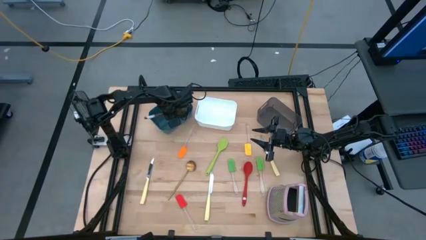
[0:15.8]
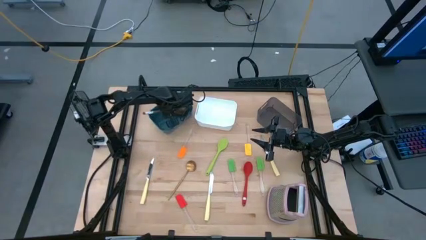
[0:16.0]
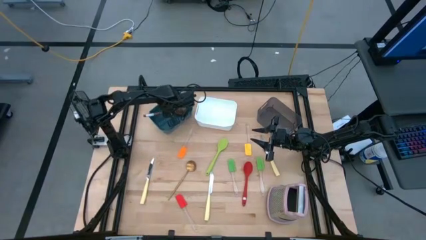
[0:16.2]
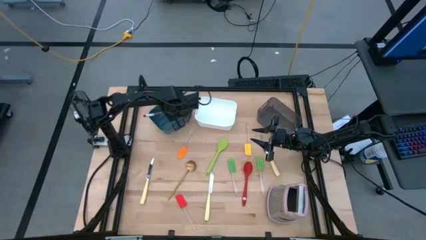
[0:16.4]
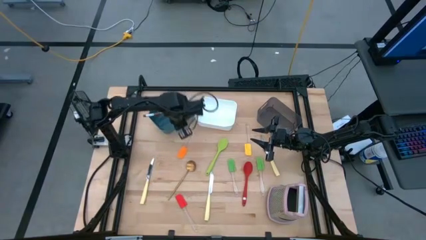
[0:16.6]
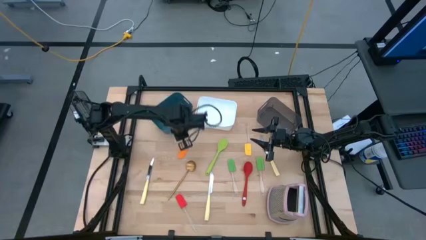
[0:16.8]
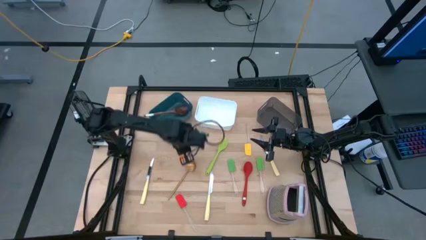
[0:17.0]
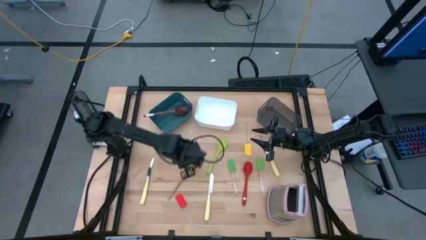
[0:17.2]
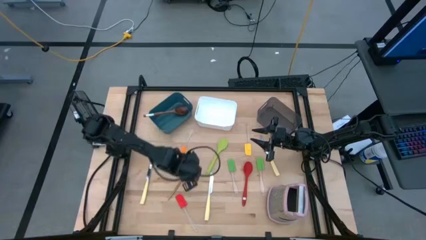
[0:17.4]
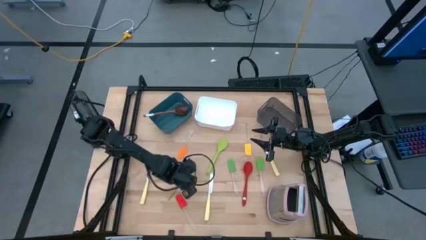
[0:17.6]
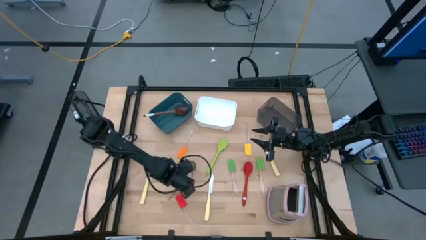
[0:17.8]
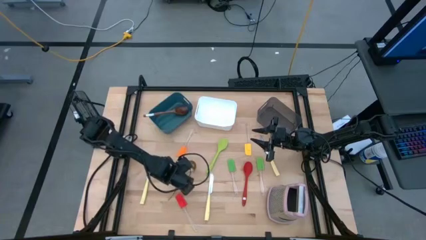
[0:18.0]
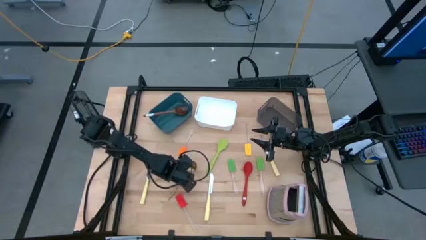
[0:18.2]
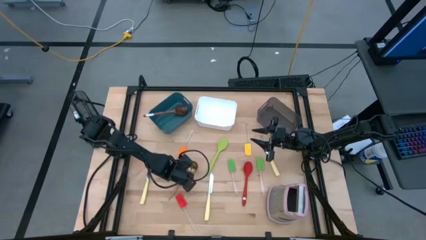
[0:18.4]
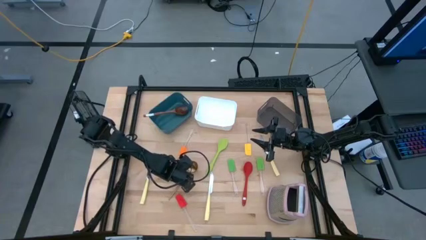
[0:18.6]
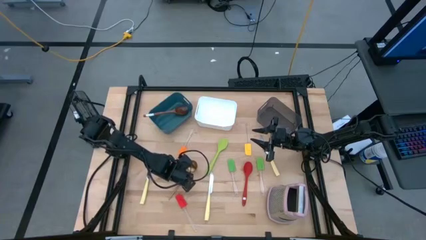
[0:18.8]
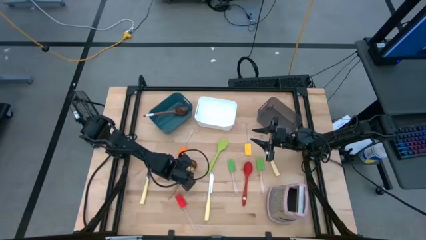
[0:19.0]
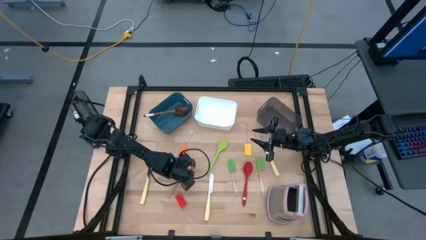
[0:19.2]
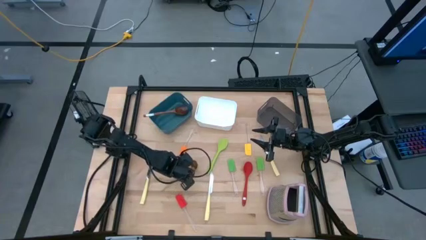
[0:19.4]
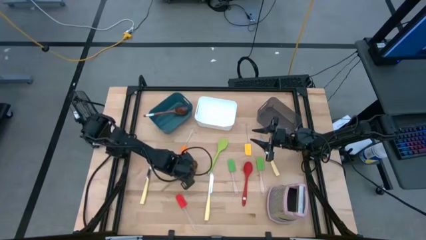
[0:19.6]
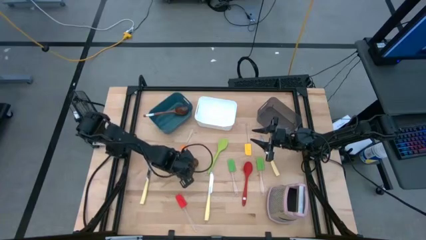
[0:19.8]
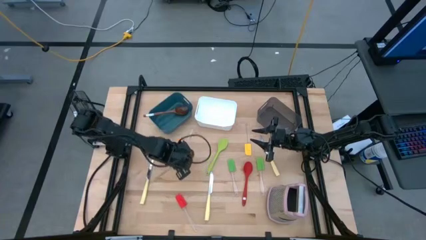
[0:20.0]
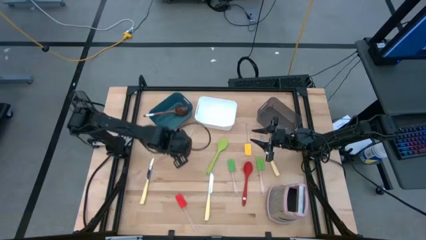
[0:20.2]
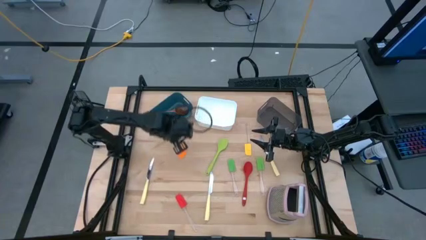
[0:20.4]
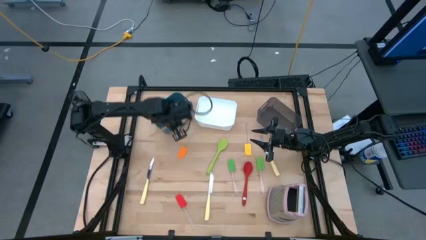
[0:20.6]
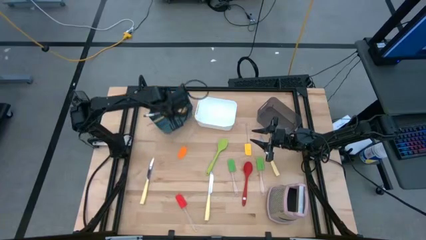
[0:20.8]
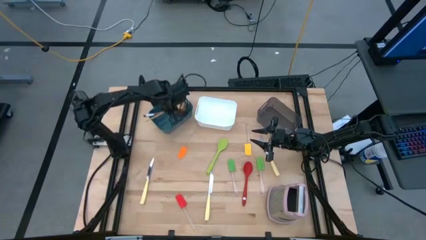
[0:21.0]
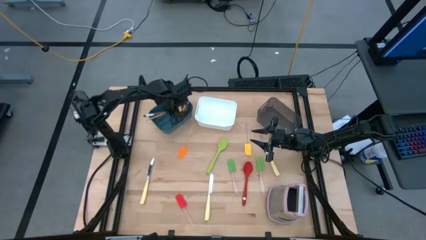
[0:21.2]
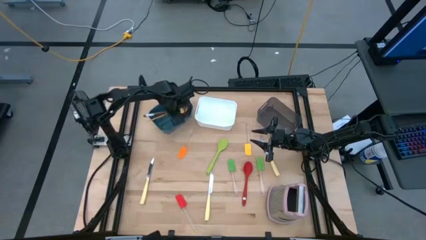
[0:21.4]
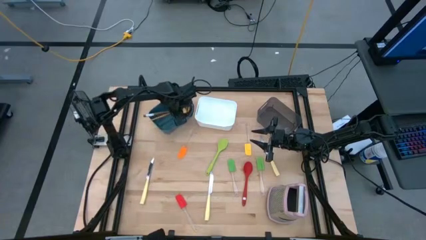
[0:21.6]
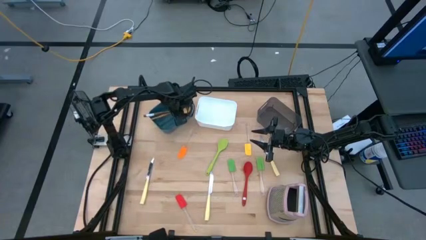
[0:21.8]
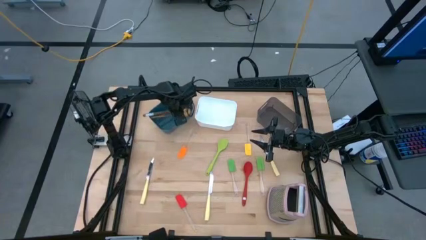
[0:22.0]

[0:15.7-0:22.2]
Task: Pick & Place Kitchen Items
Put the gold serving spoon into the blue bin

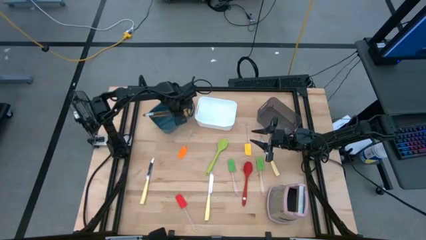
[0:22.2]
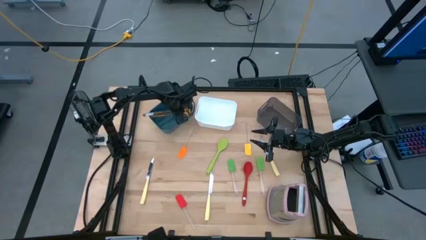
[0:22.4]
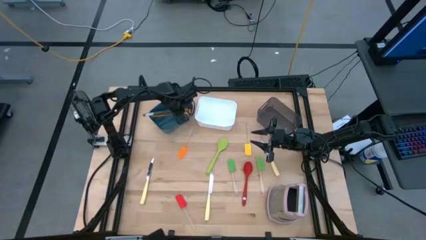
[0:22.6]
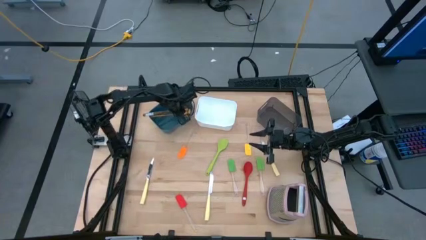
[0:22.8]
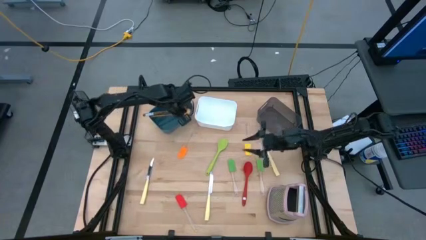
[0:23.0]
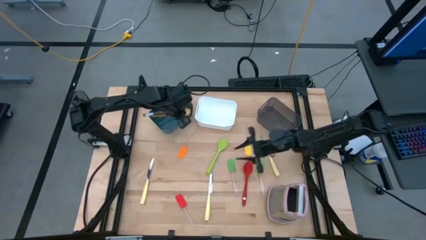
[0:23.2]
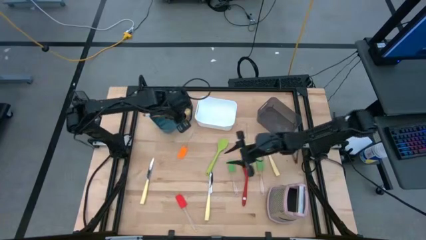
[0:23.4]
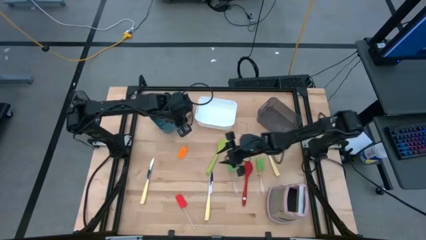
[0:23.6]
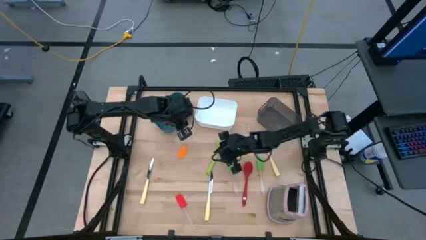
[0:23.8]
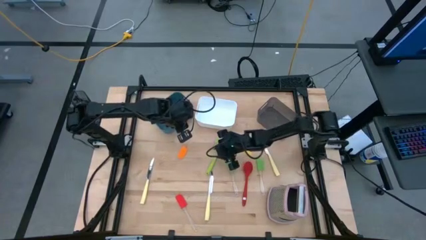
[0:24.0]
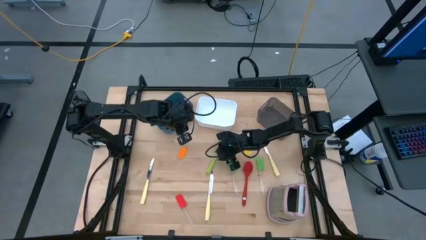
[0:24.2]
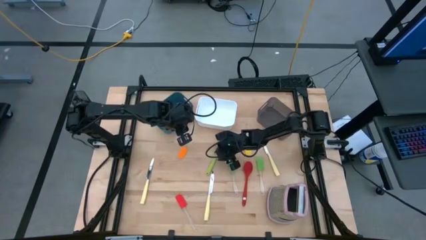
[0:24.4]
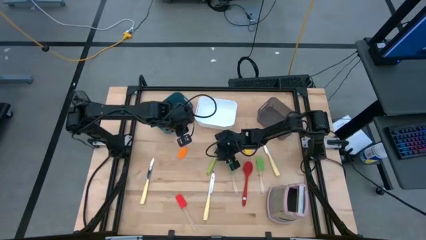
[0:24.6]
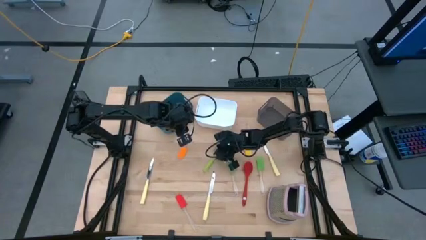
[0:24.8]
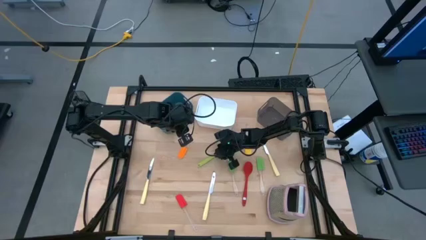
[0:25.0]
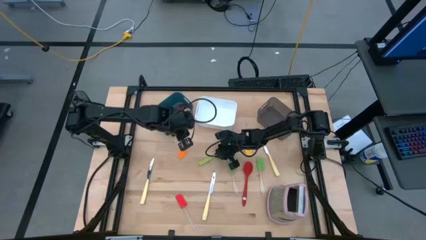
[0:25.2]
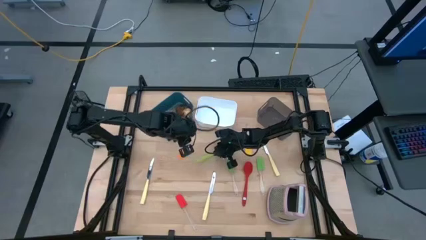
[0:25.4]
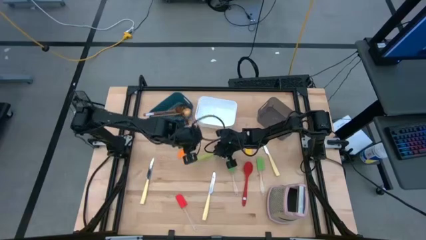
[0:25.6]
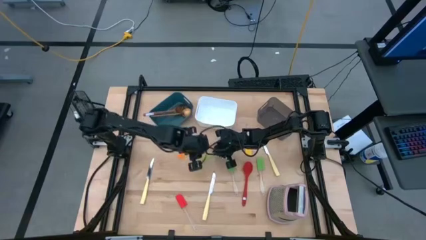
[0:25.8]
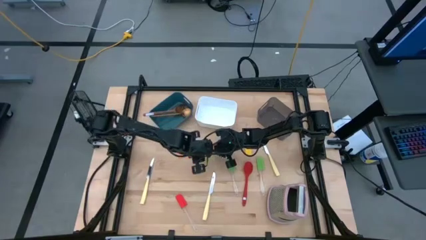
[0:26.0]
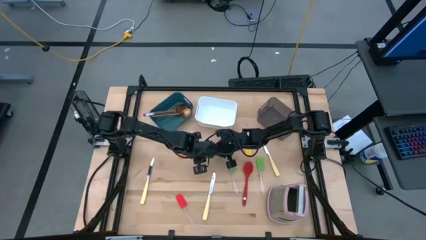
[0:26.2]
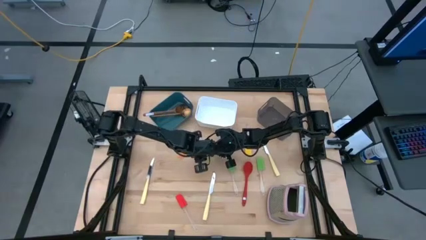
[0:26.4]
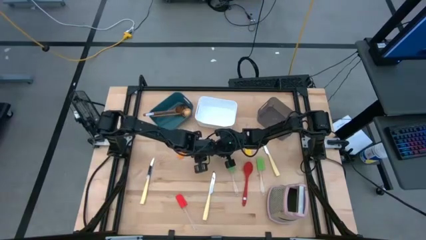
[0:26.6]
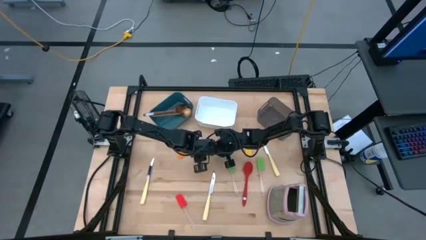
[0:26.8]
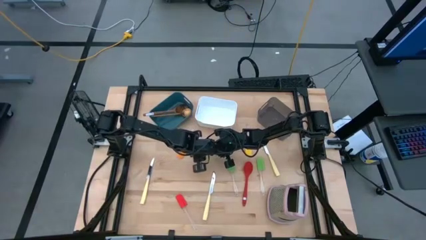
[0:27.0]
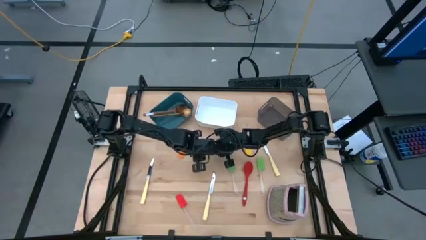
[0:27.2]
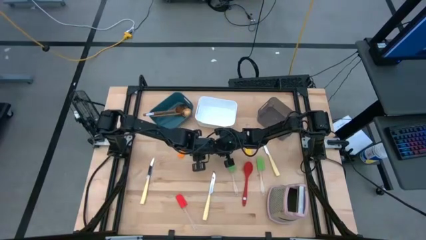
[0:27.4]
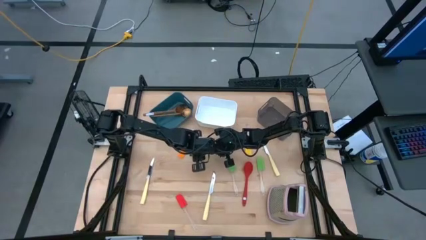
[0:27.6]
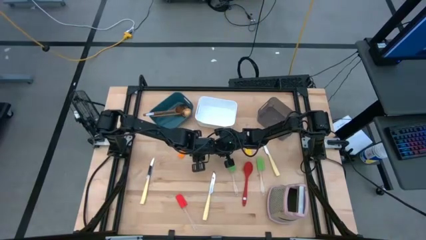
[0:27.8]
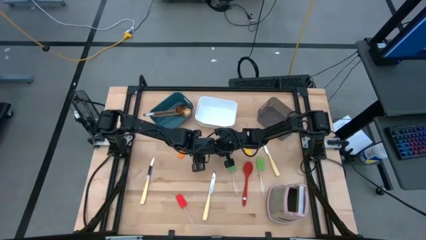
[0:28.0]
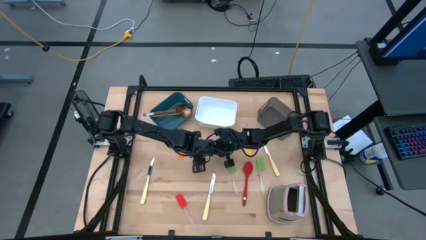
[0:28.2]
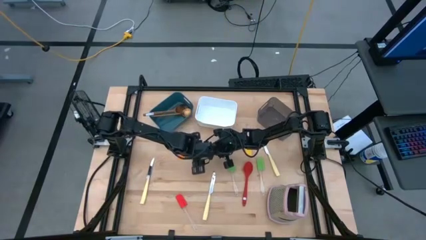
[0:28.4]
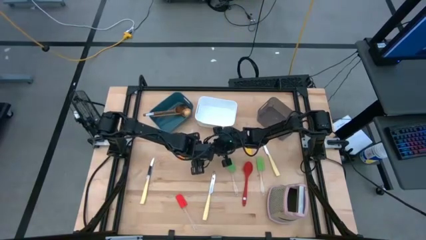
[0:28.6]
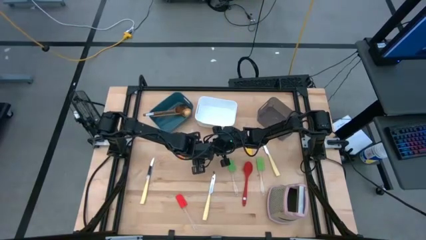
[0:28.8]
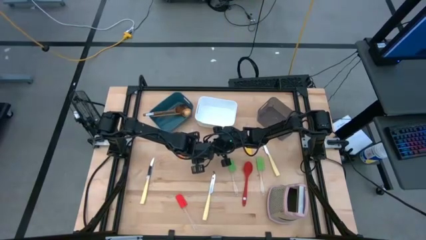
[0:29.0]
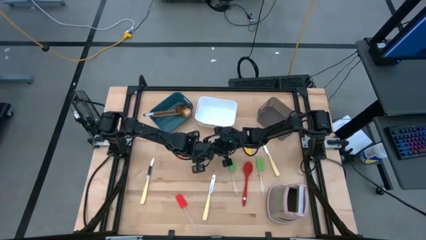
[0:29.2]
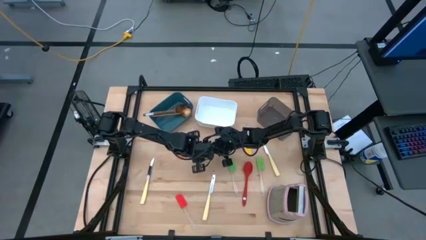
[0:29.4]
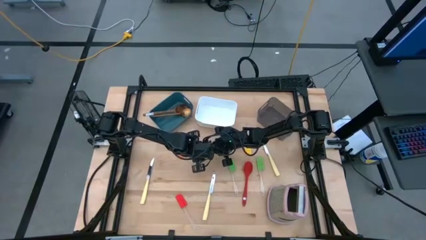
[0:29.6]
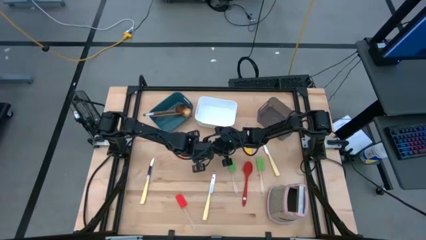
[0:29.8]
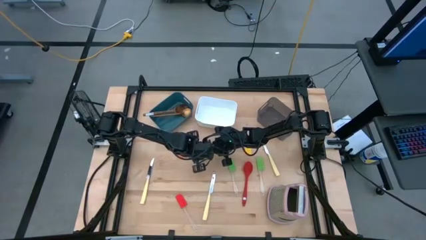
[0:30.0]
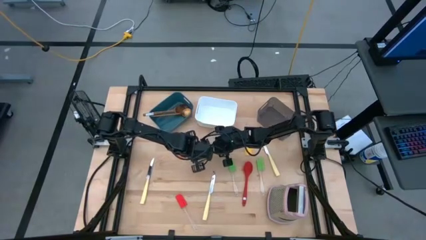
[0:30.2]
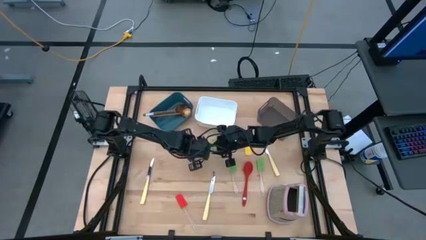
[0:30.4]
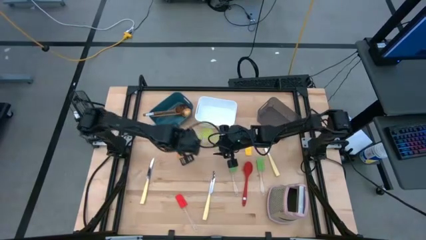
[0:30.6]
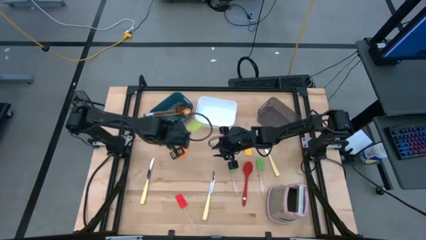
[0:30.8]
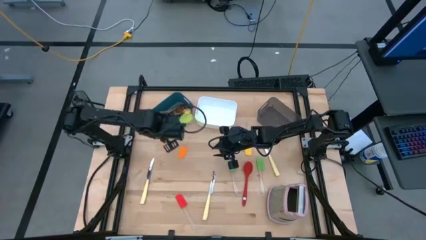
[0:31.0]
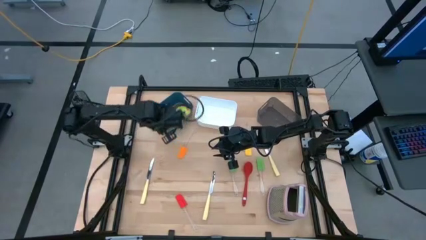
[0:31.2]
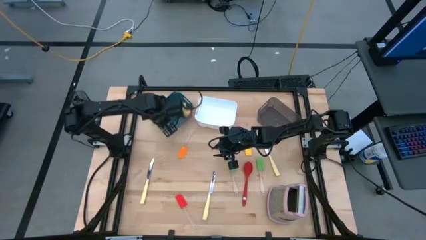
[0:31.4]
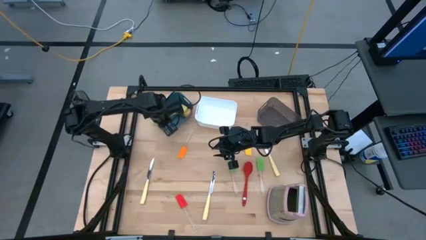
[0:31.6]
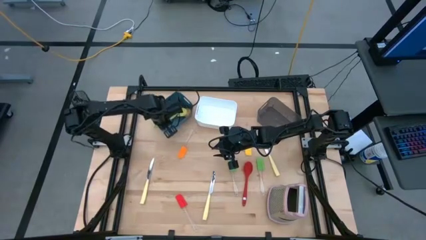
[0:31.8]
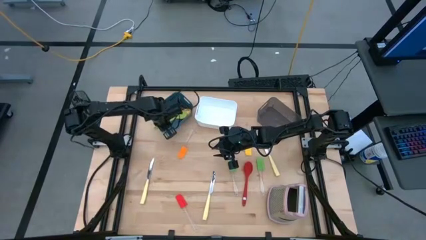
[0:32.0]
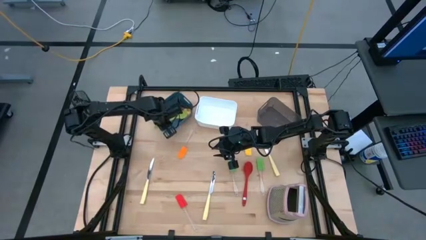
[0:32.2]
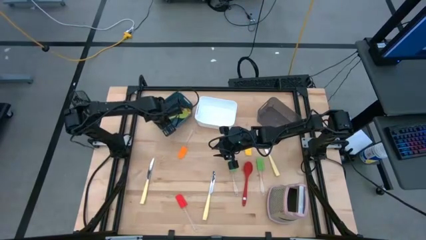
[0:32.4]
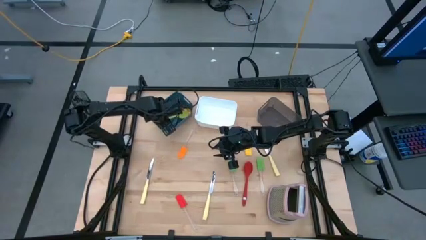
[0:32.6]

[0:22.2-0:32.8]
Put the light green serving spoon into the blue bin
